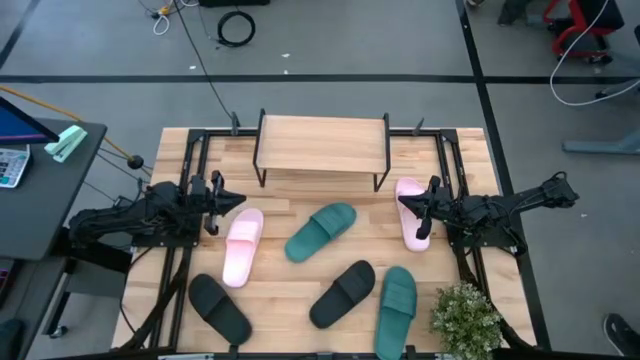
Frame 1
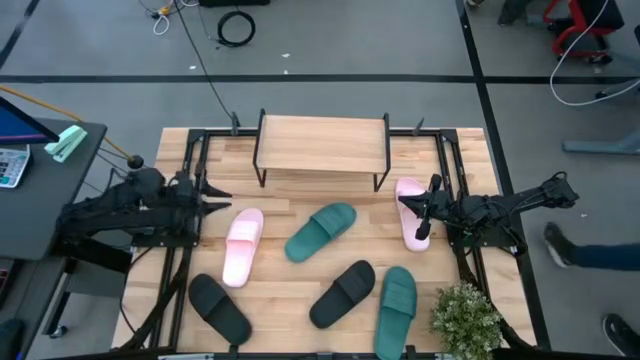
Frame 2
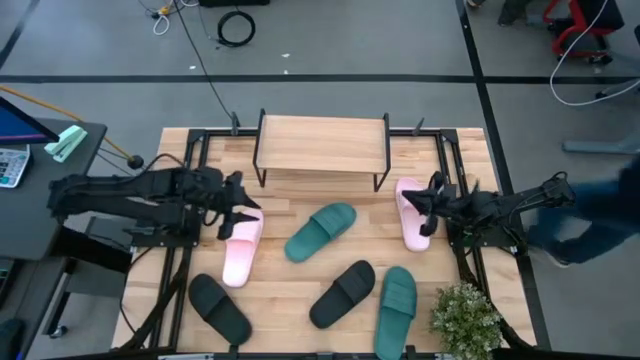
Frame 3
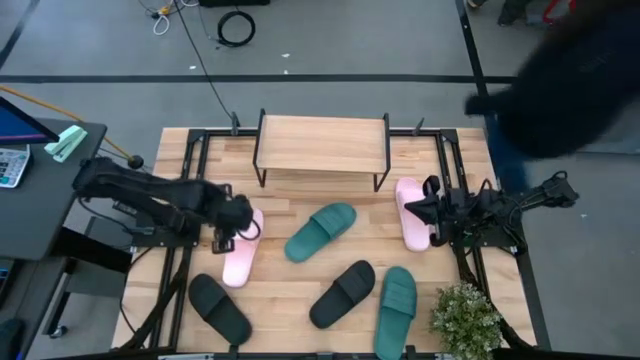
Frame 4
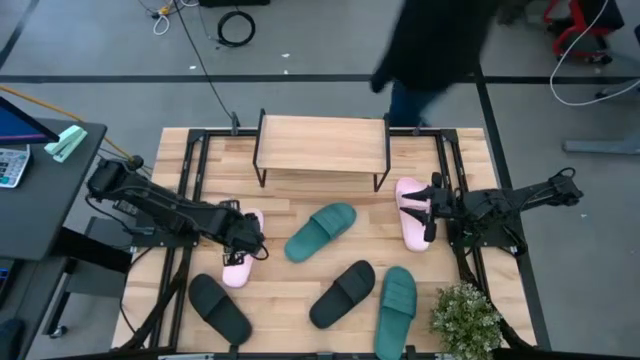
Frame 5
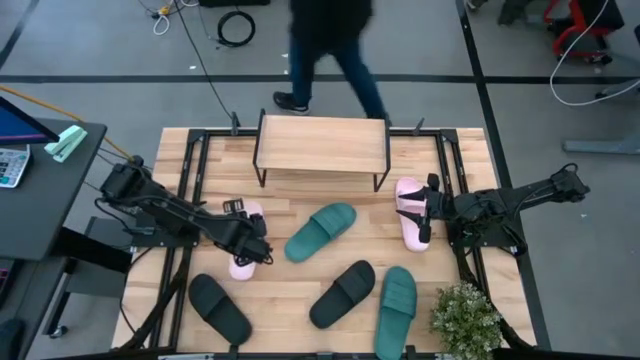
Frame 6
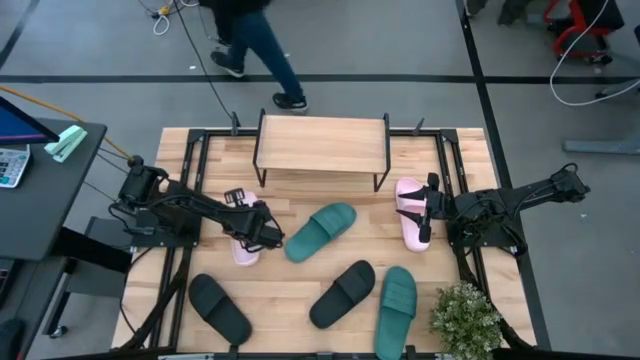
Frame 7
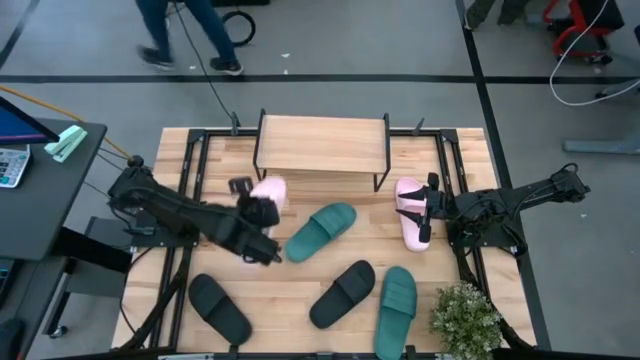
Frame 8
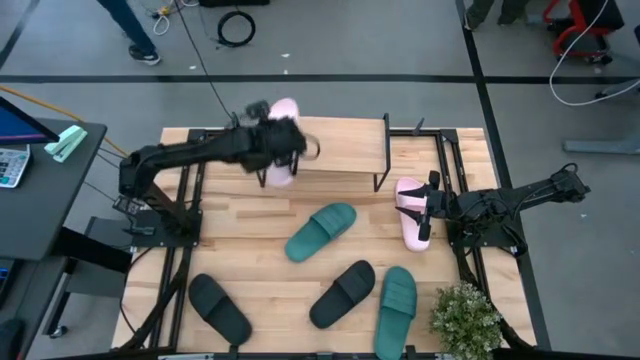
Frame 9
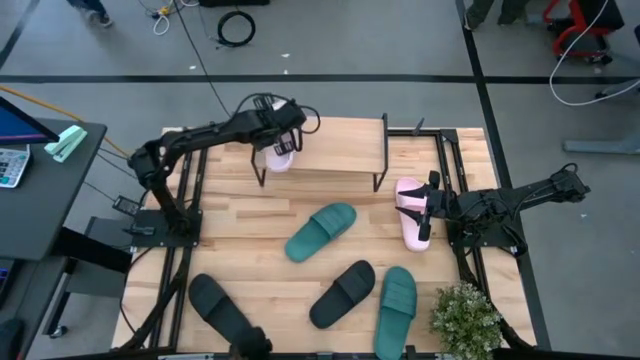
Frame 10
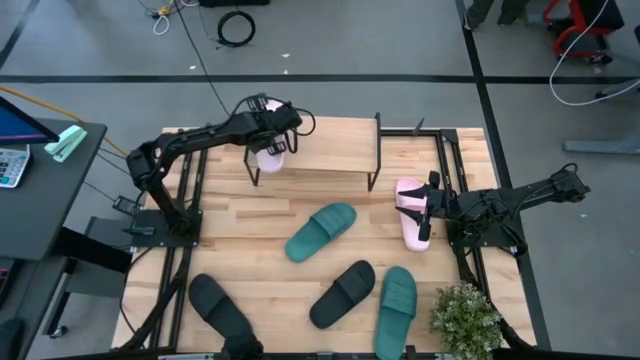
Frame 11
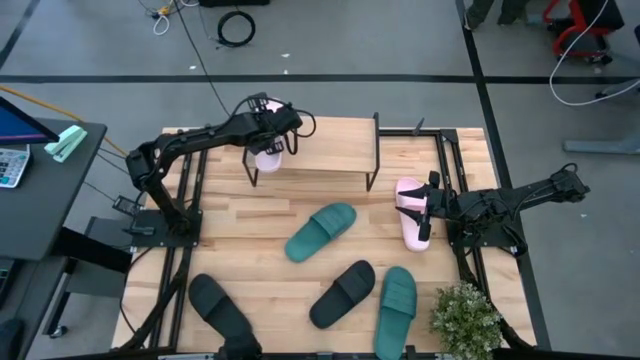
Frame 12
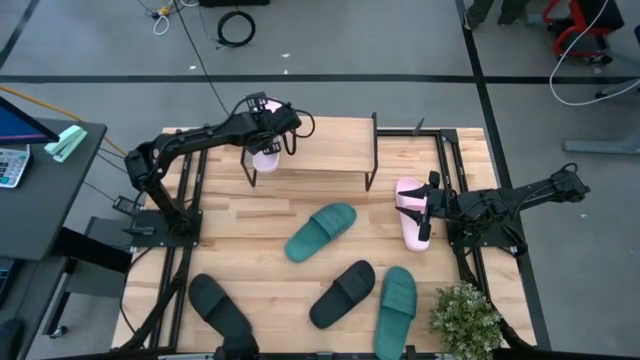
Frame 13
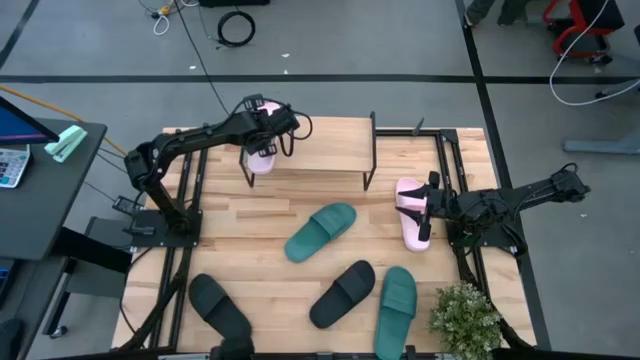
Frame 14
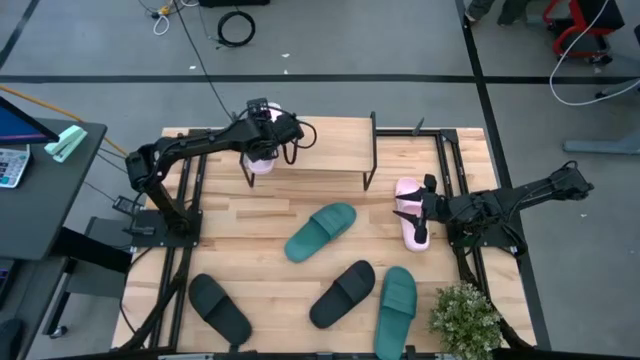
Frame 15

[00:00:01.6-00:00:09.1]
Task: Pick and place slides into the shelf
Put the left pink slide on the shelf

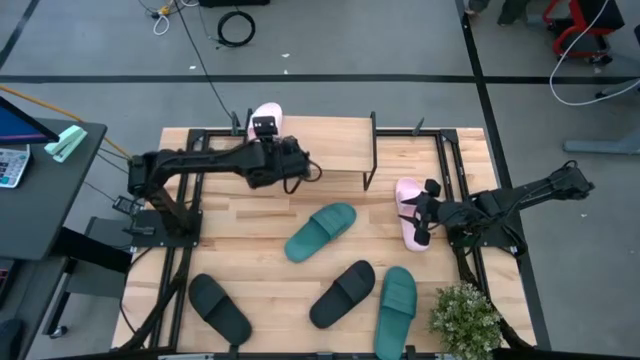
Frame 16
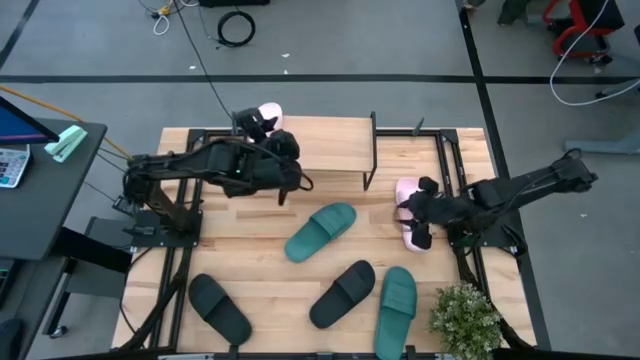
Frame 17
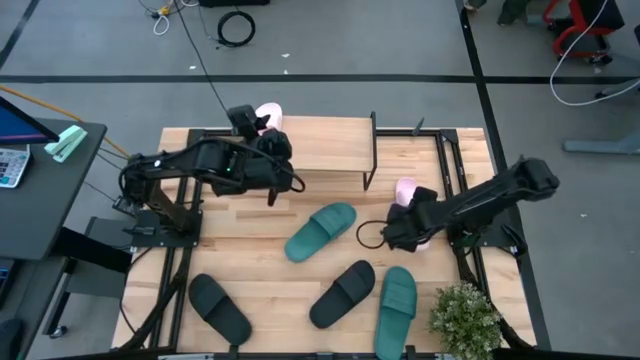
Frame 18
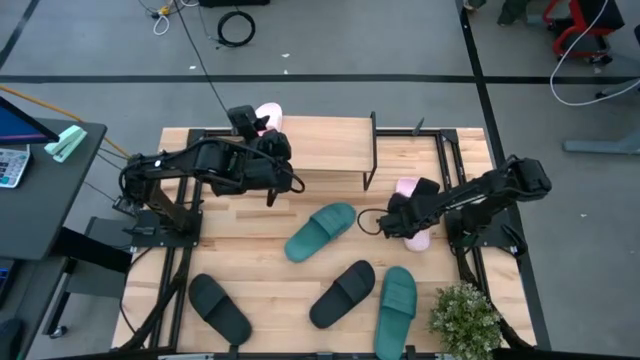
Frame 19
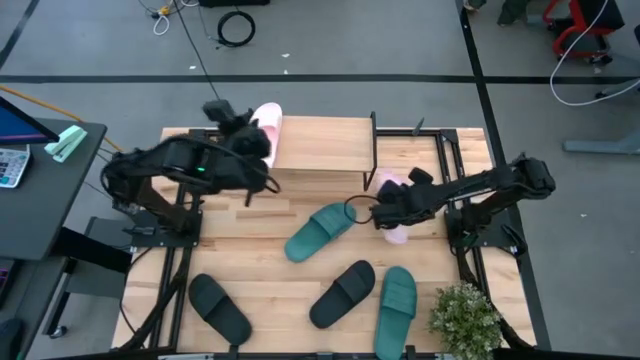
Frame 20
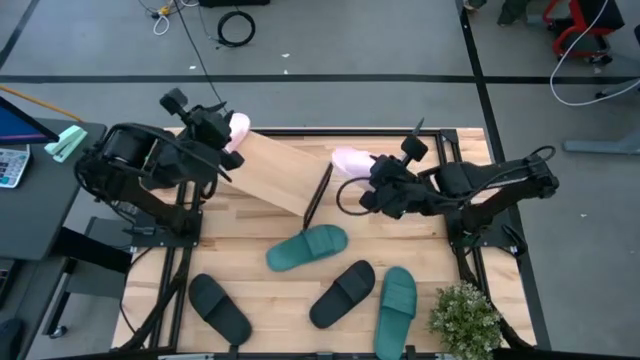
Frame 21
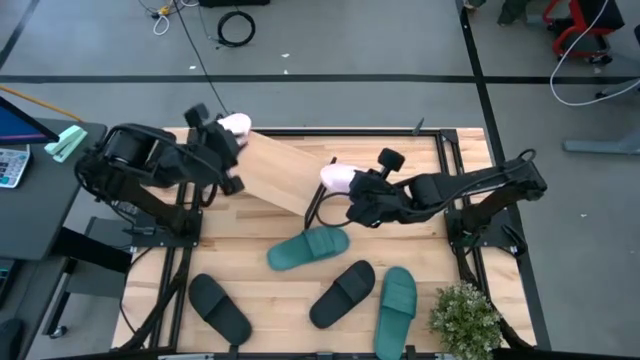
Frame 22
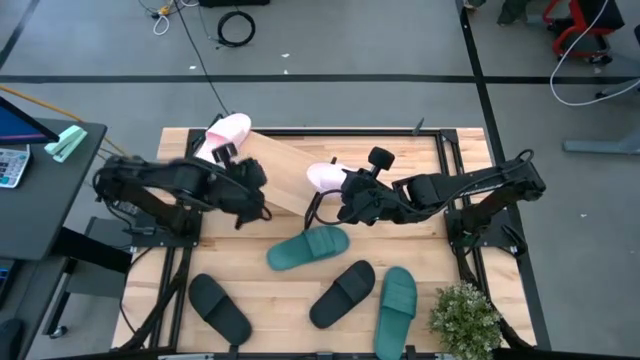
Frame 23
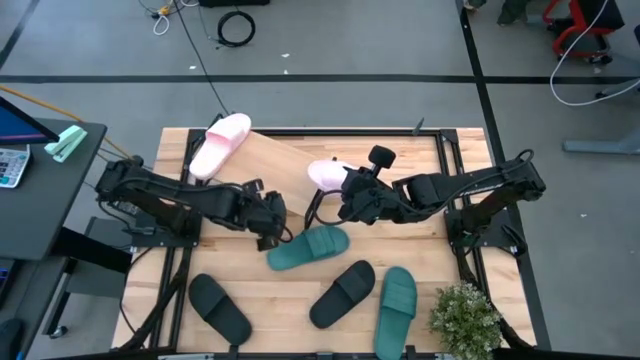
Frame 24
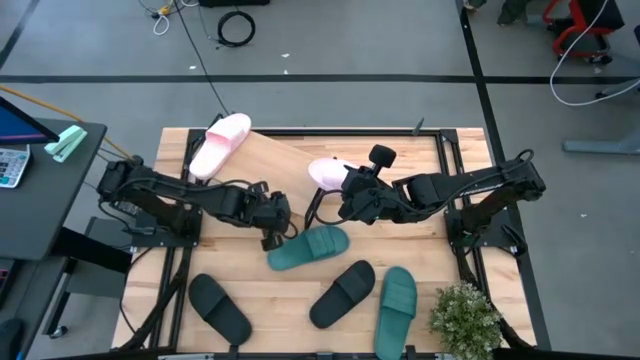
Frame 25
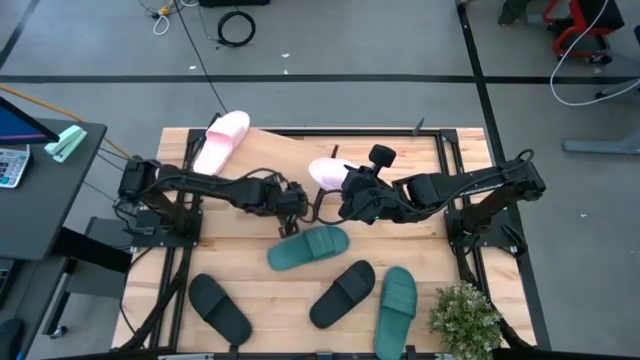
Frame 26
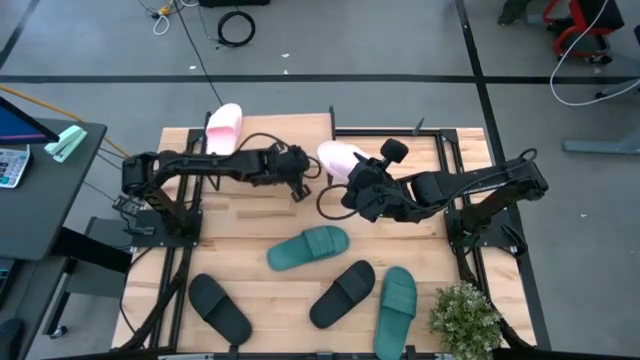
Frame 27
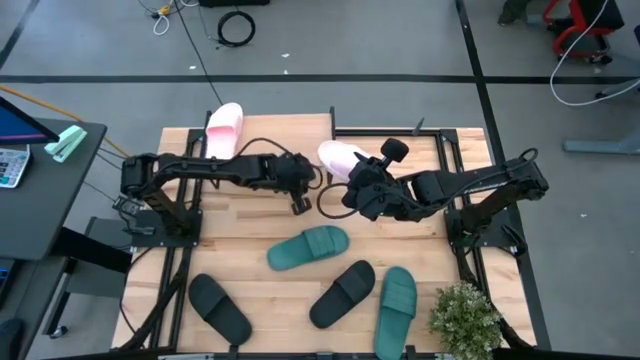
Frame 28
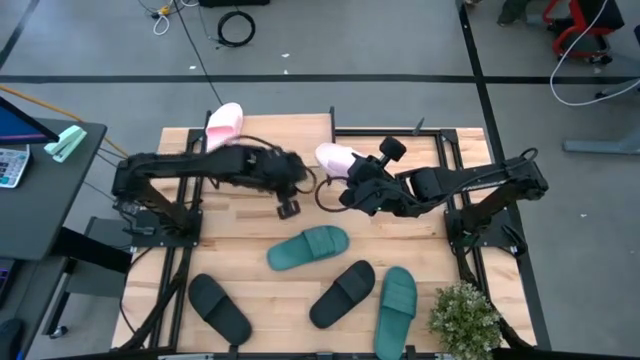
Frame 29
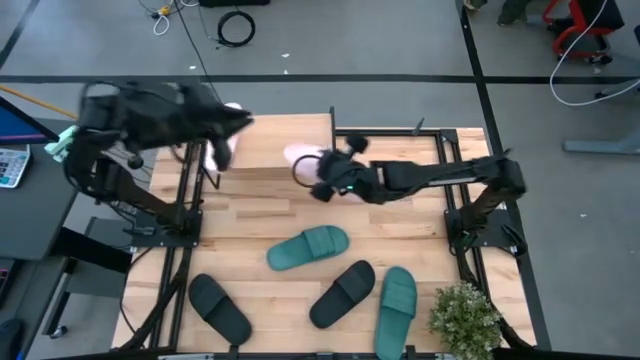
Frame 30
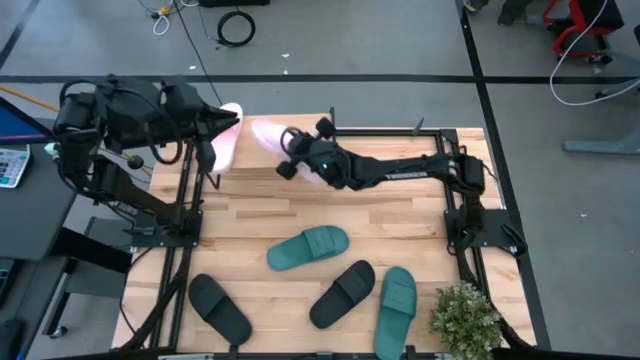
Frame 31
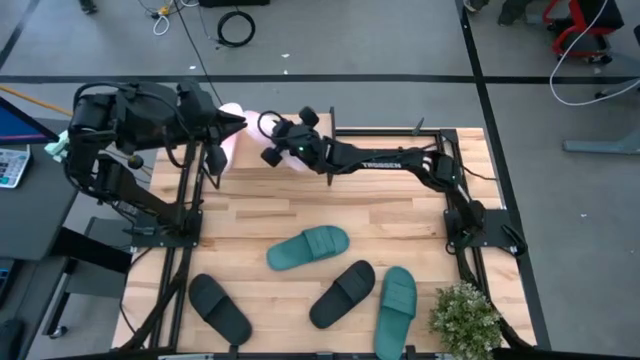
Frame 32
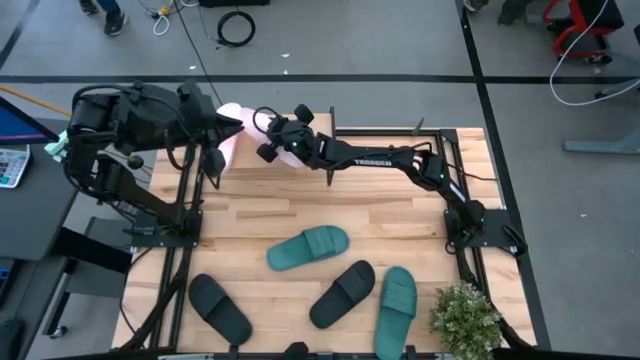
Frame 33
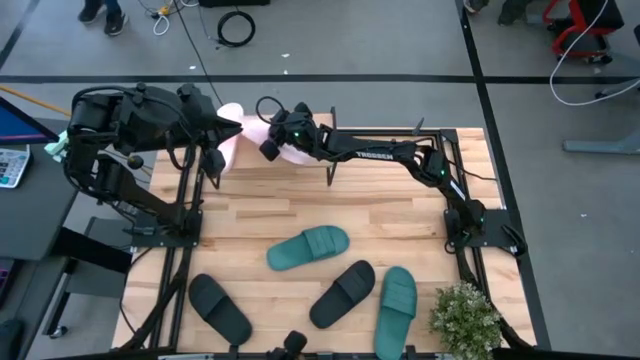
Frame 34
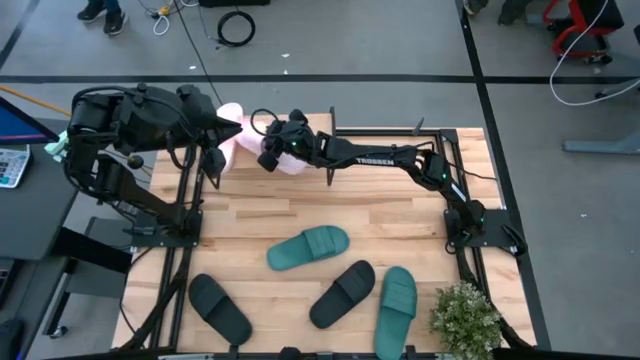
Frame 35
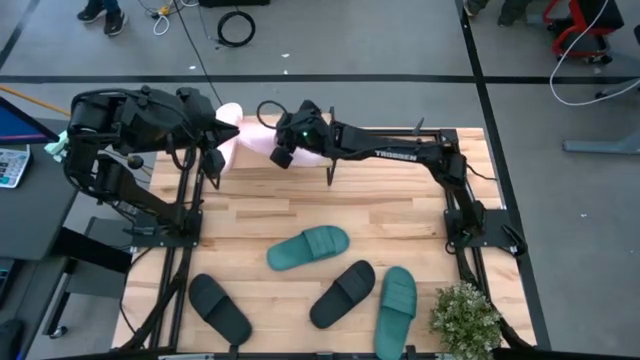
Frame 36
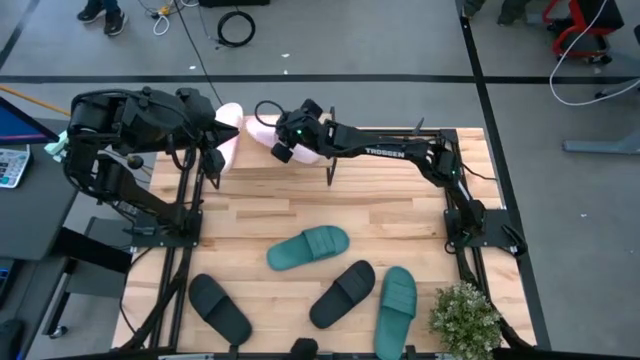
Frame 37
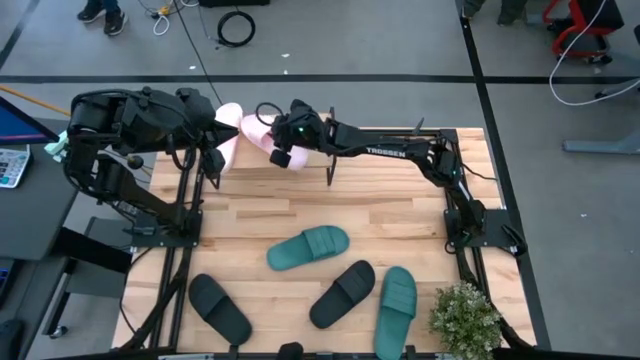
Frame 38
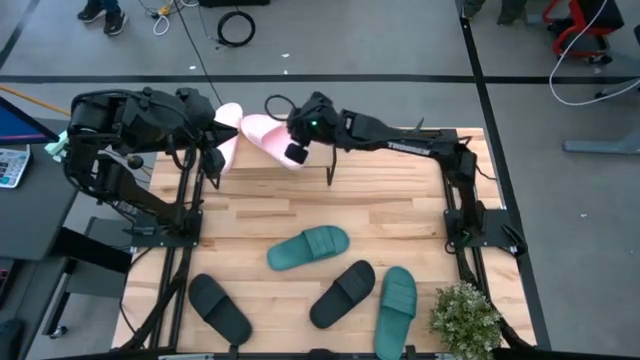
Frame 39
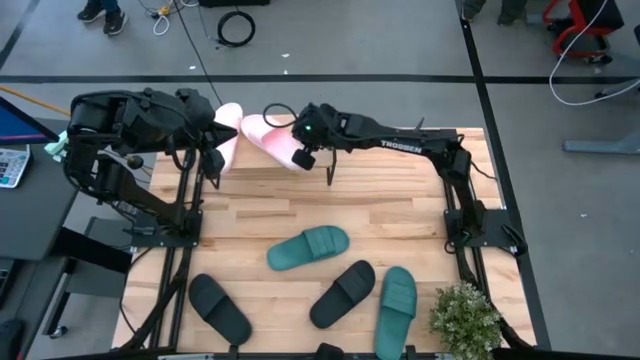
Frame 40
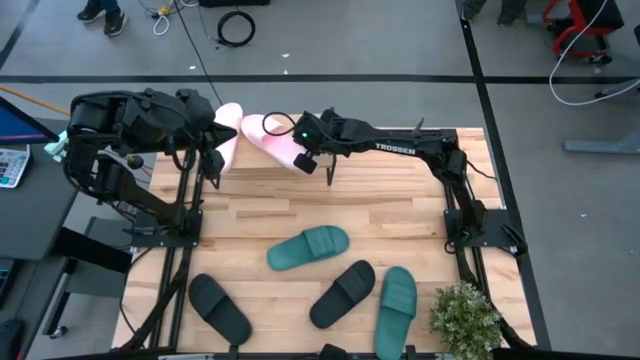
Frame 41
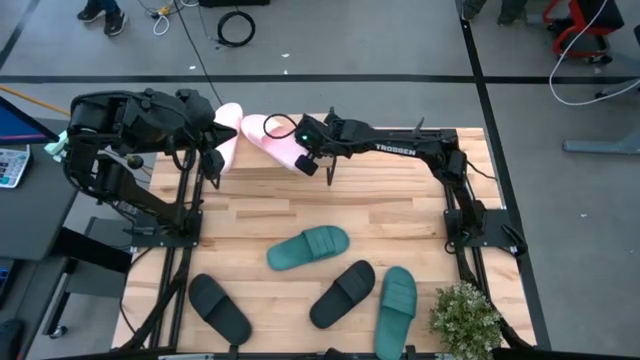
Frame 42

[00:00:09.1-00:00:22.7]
Put the pink slide on the shelf
